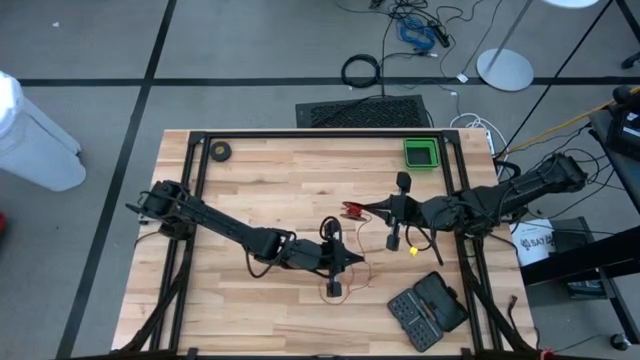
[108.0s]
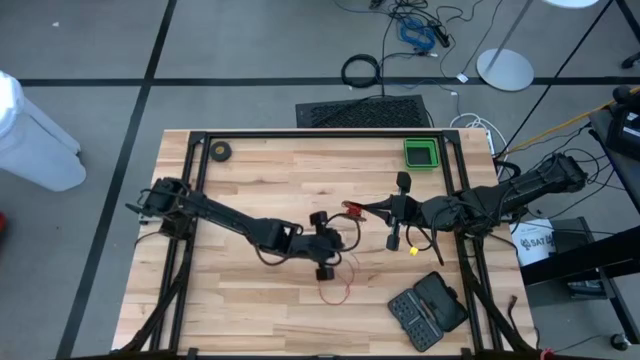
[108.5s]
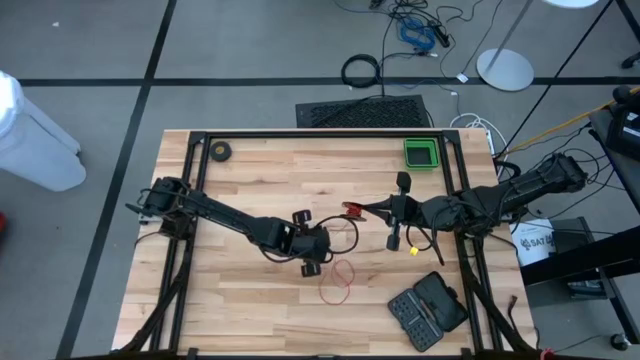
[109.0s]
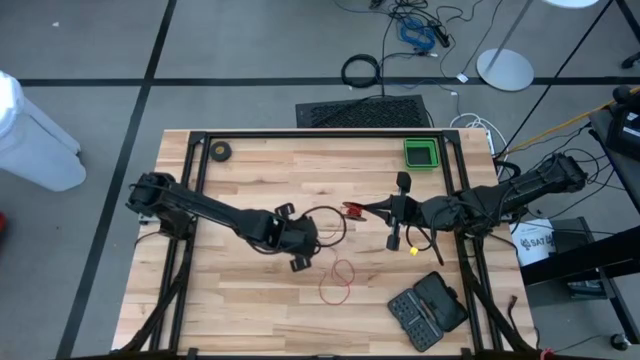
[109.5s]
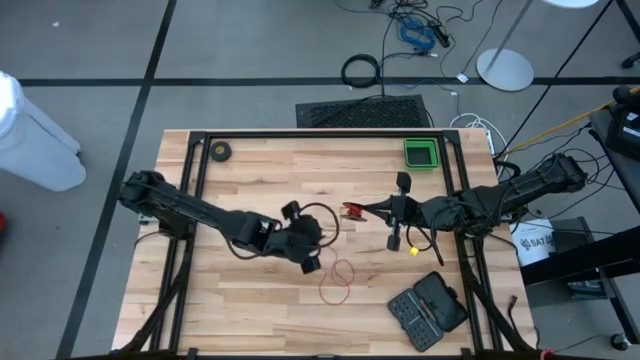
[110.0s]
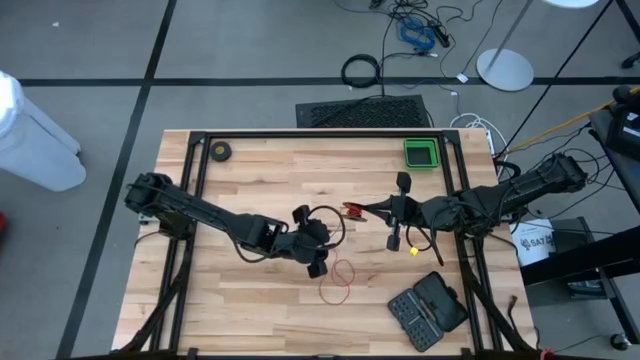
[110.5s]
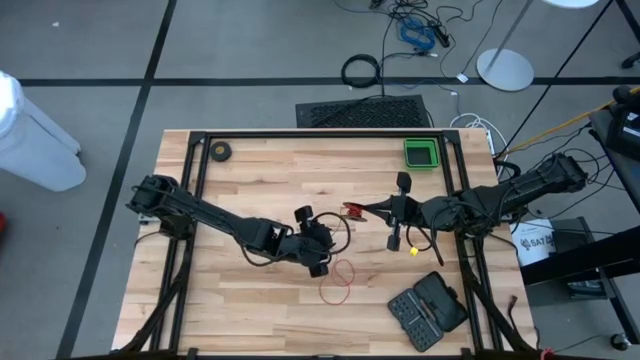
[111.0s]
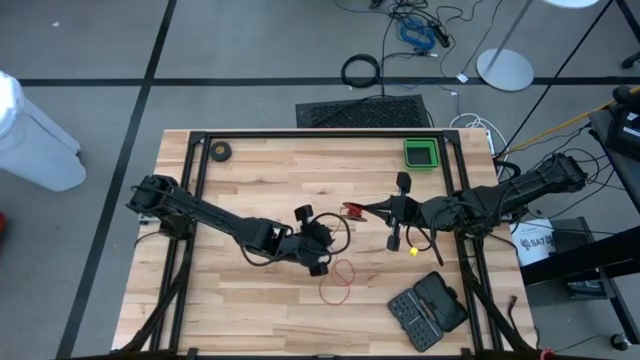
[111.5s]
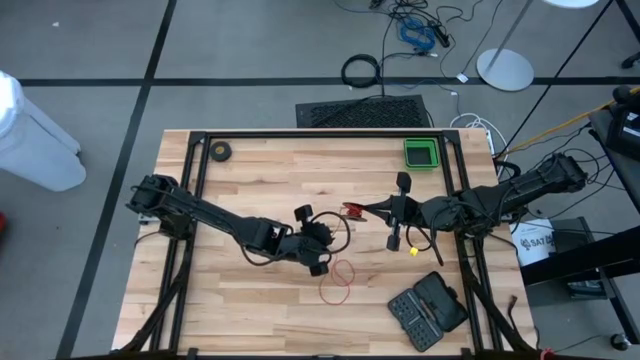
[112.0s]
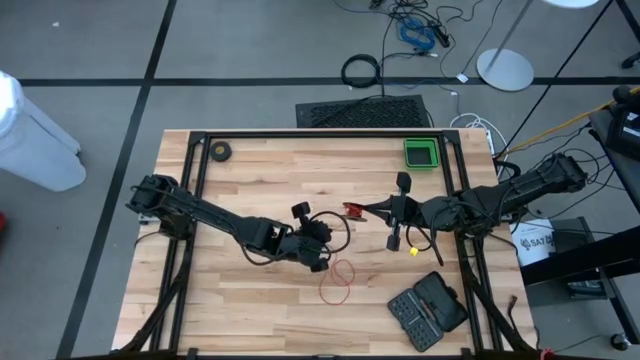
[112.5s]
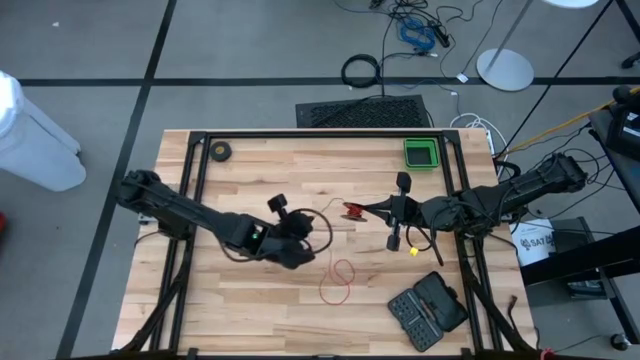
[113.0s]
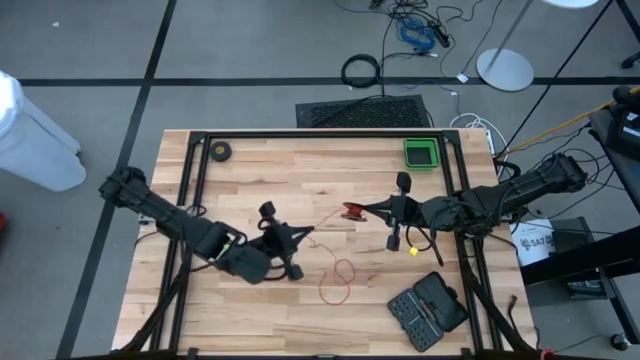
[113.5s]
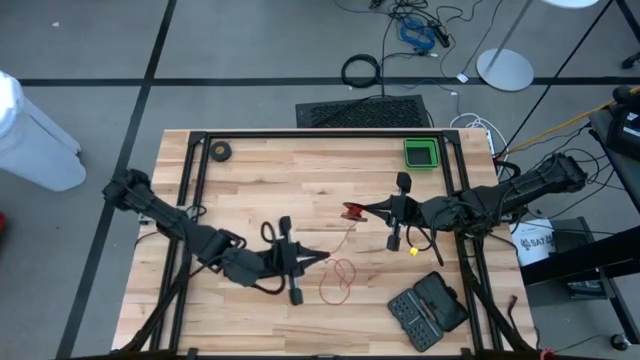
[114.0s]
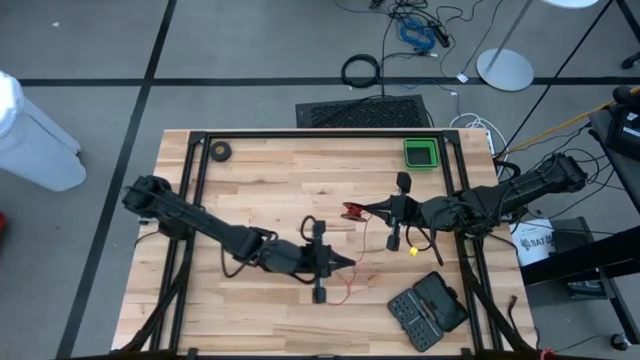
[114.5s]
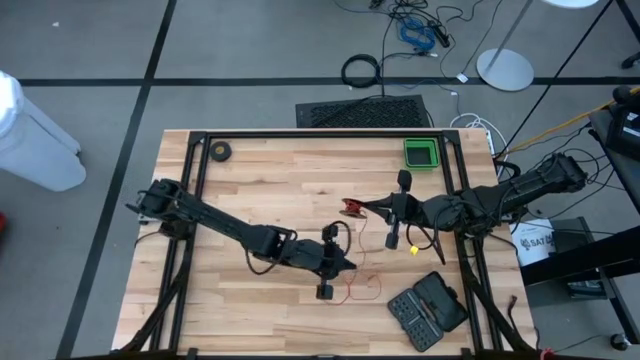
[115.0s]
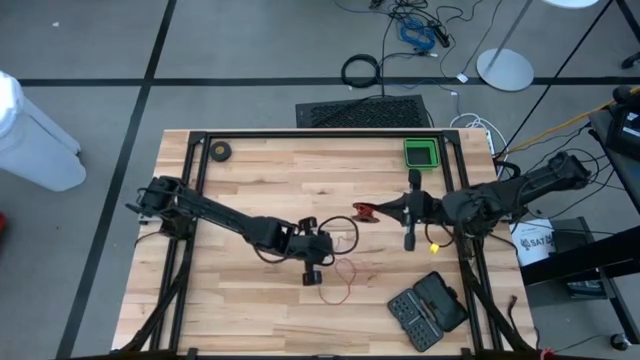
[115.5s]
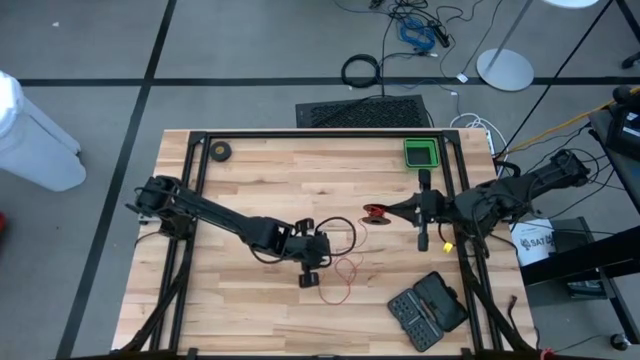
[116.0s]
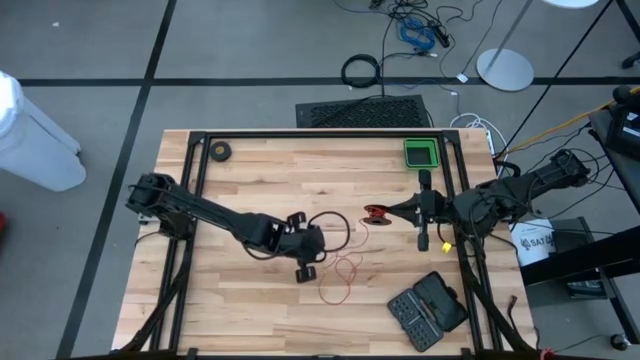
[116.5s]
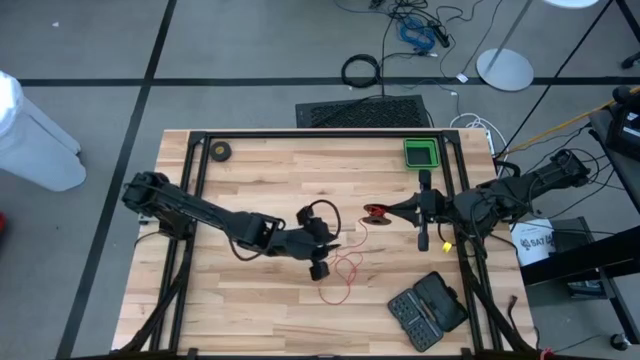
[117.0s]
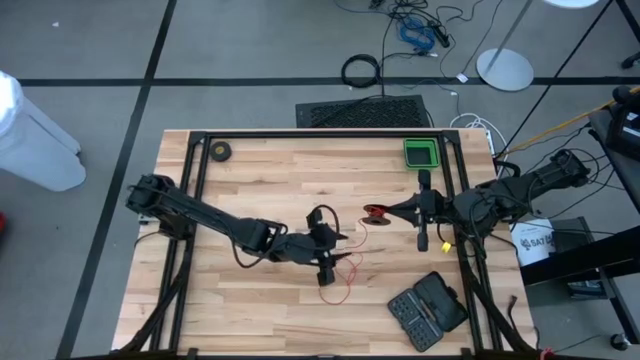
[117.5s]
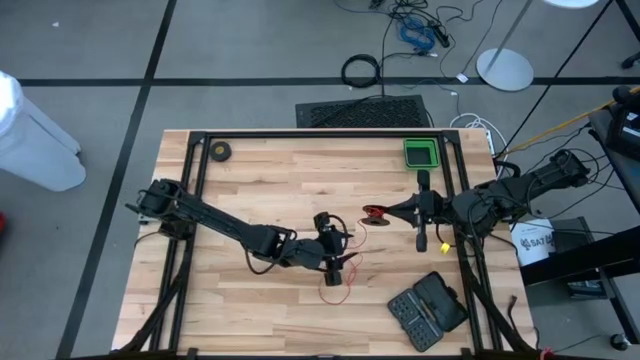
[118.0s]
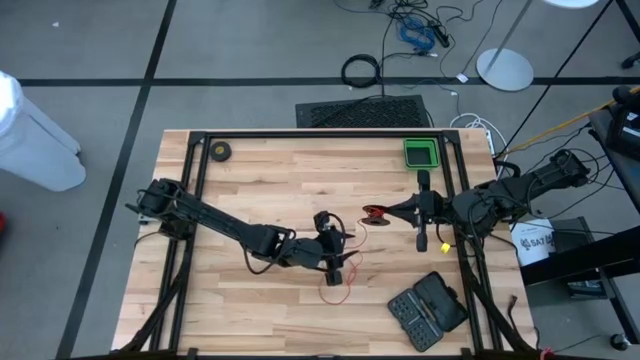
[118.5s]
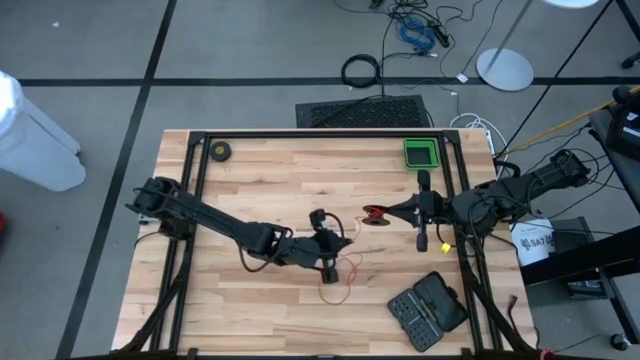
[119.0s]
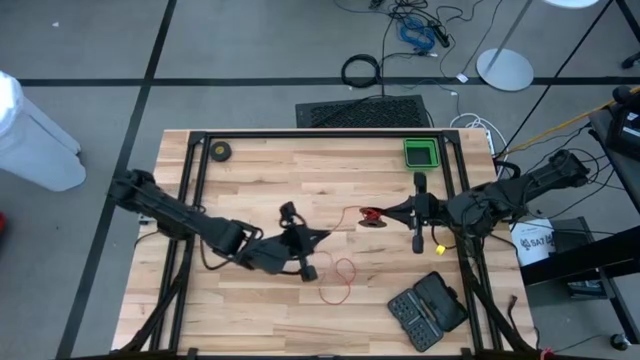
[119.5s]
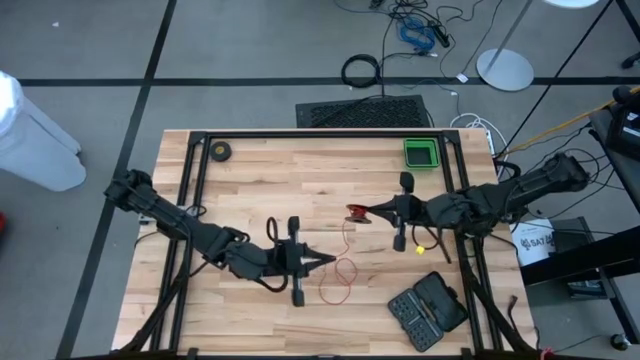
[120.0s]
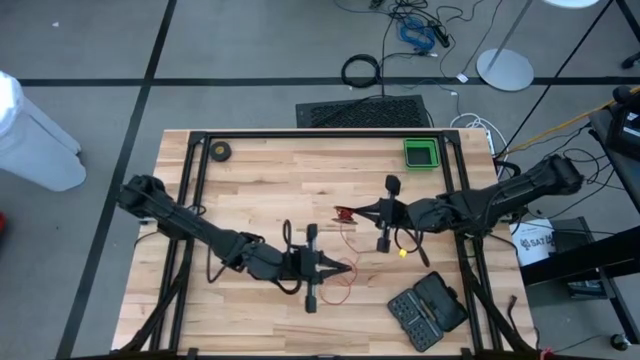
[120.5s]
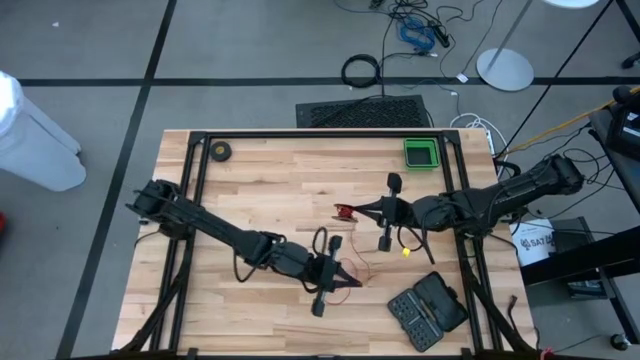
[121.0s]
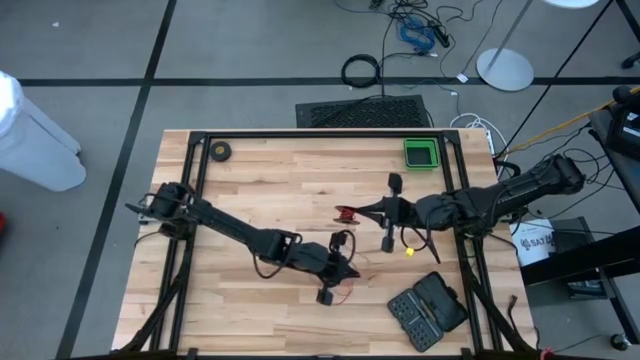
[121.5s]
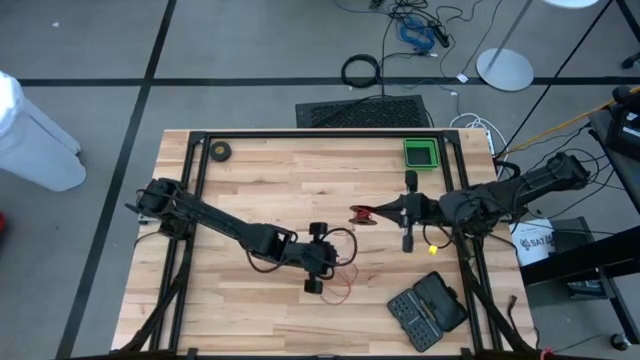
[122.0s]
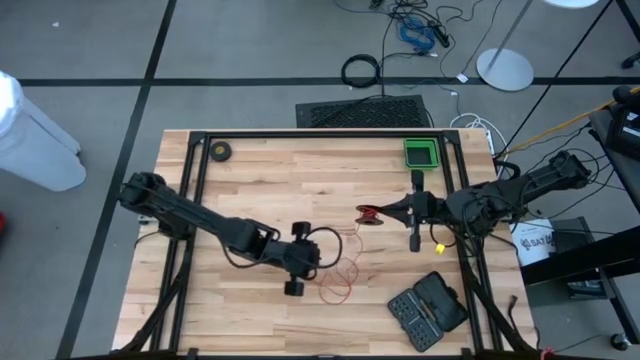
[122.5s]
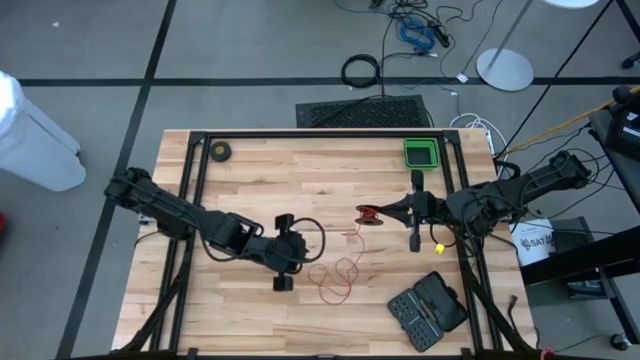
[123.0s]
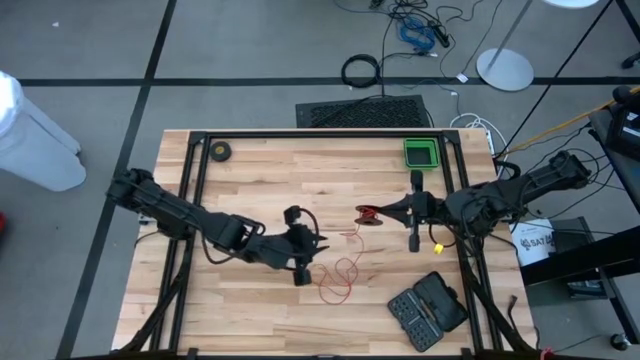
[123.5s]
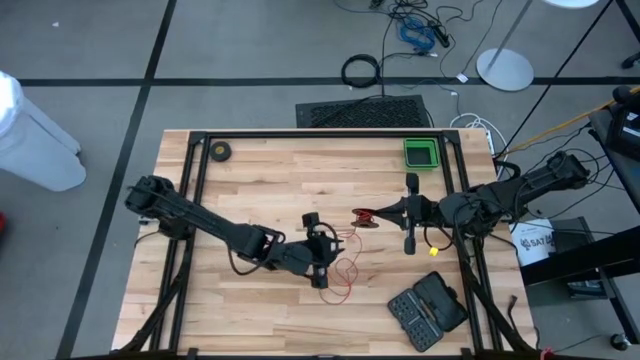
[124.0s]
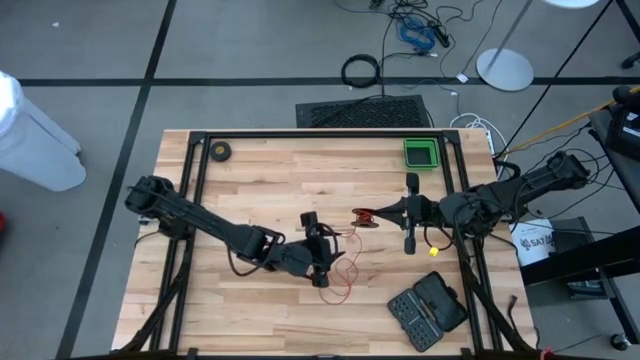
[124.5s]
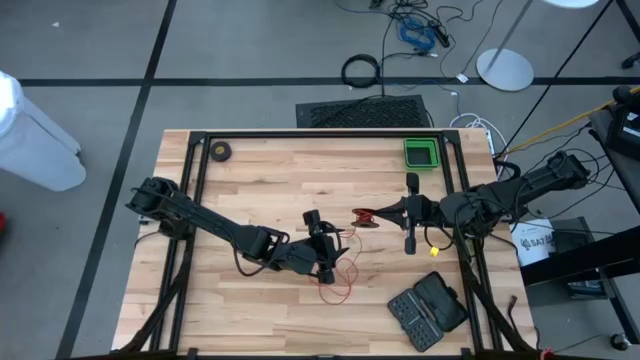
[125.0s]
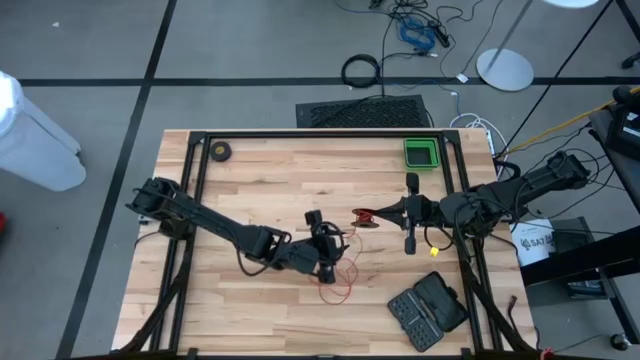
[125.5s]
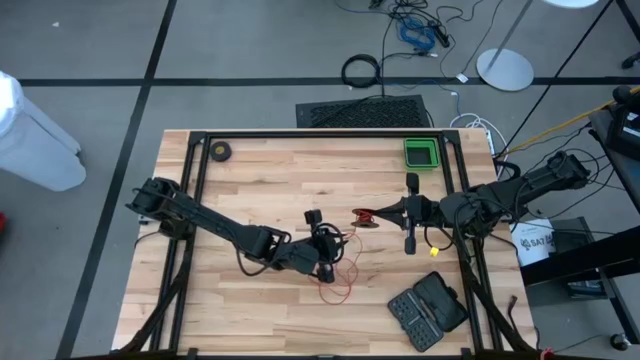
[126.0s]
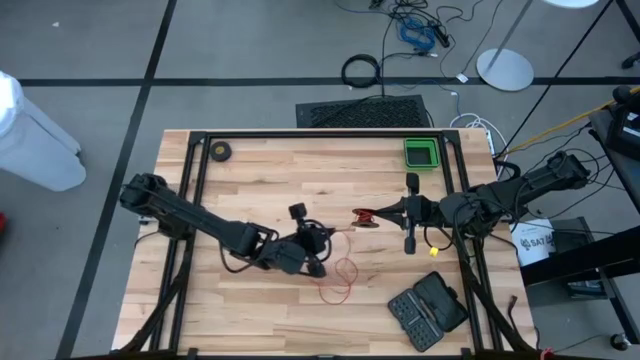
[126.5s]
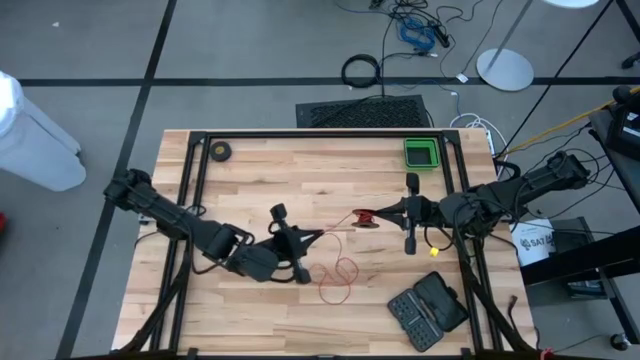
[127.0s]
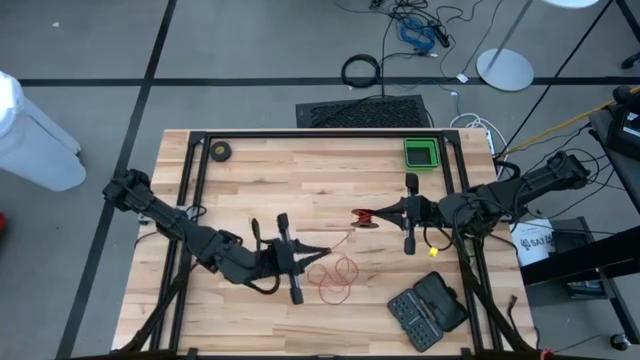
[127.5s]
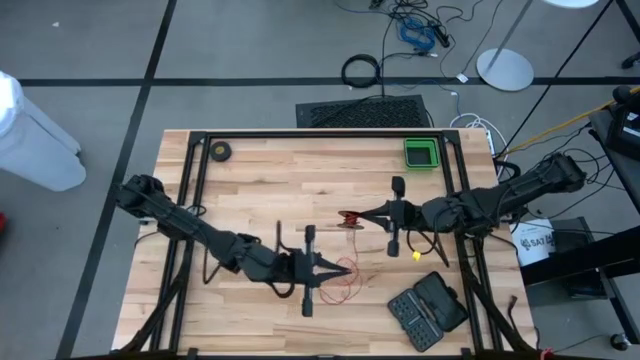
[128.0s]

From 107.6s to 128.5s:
Task: Coil cords
Uncoil the red wire from the spool
